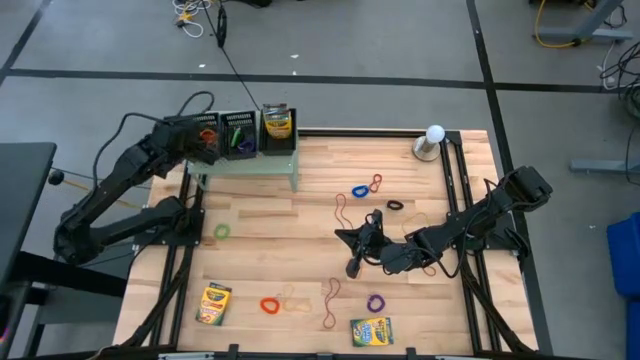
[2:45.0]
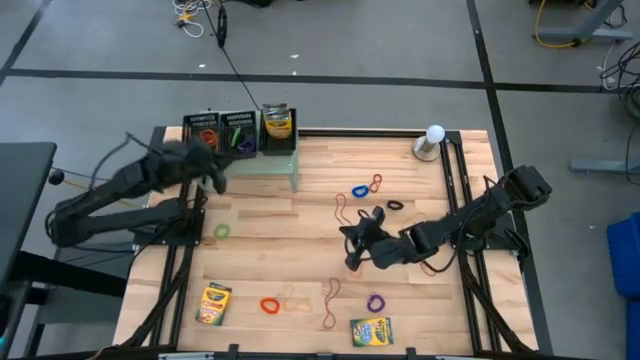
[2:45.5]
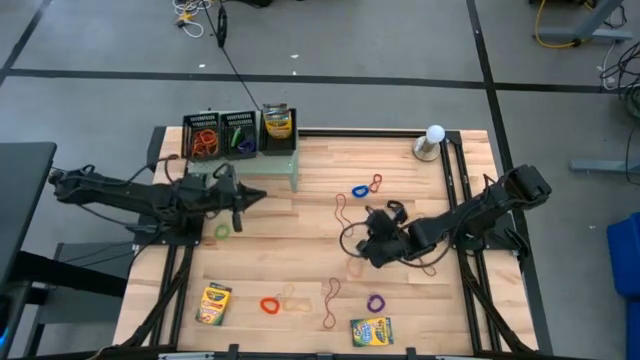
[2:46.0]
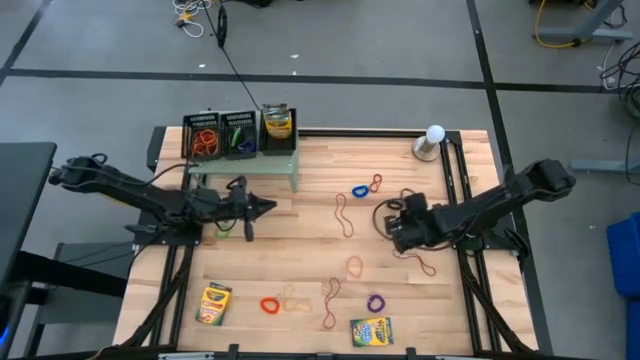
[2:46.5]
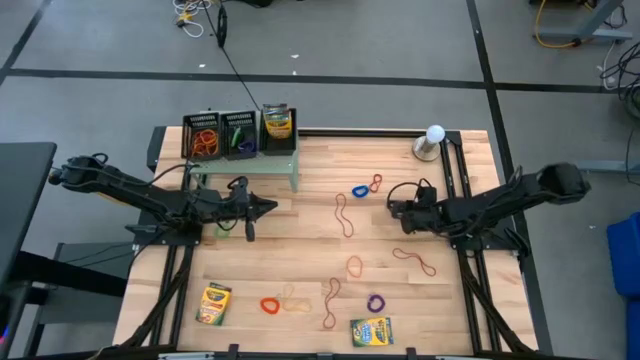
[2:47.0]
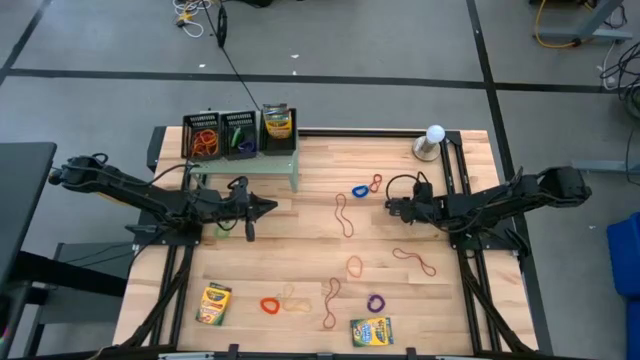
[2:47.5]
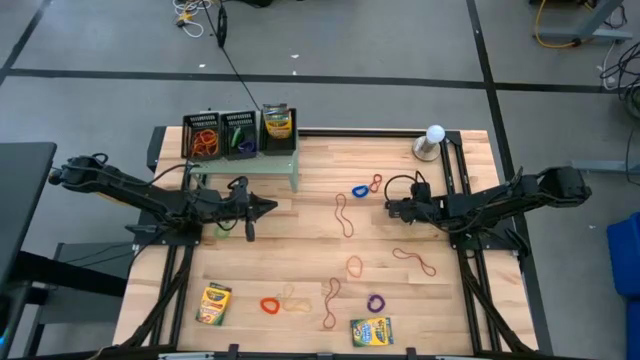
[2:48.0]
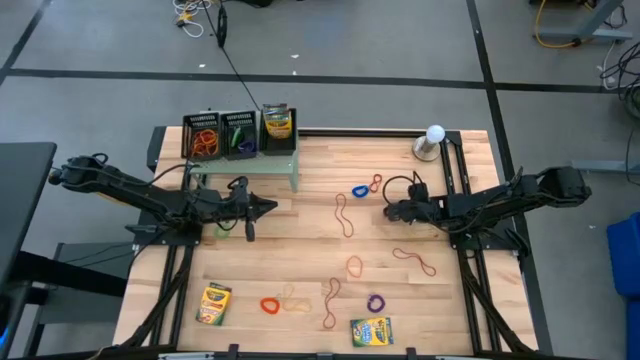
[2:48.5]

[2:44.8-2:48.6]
Task: Pick & Place Office Desk Supplies
Put the black spring keychain into the middle black bin on the shelf

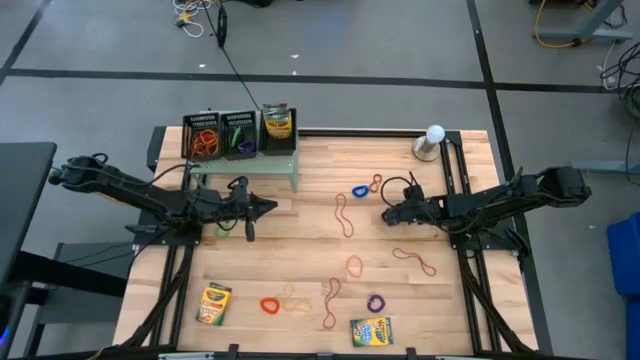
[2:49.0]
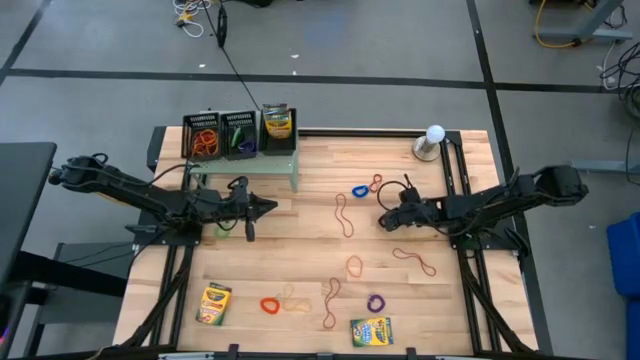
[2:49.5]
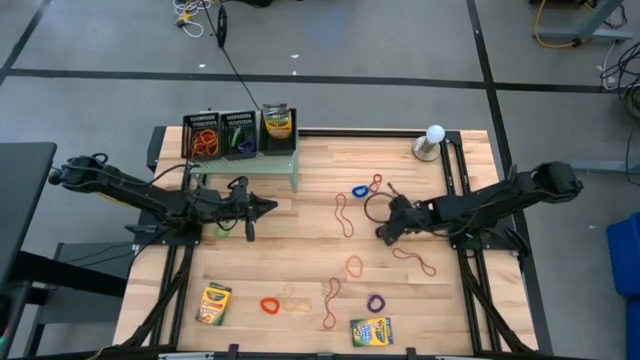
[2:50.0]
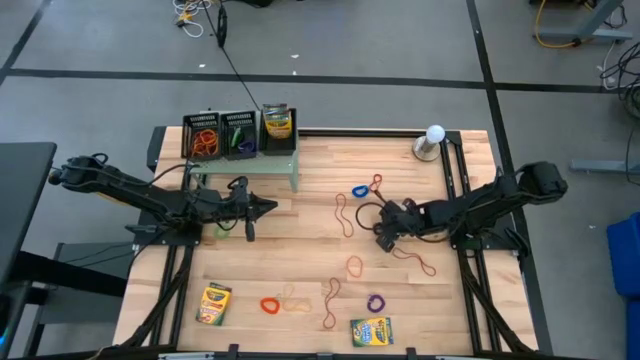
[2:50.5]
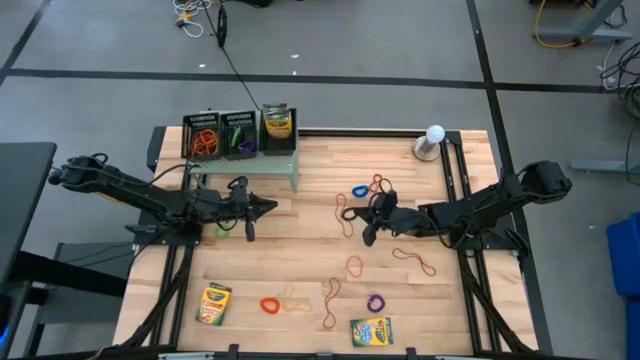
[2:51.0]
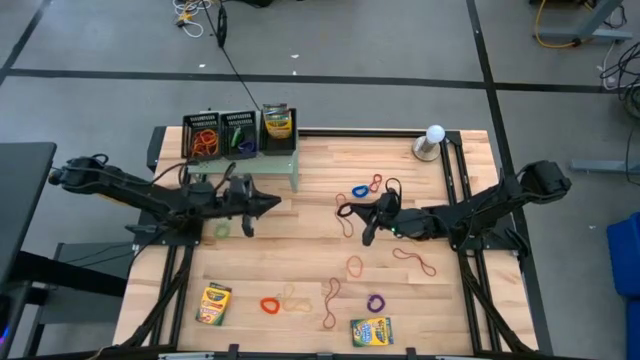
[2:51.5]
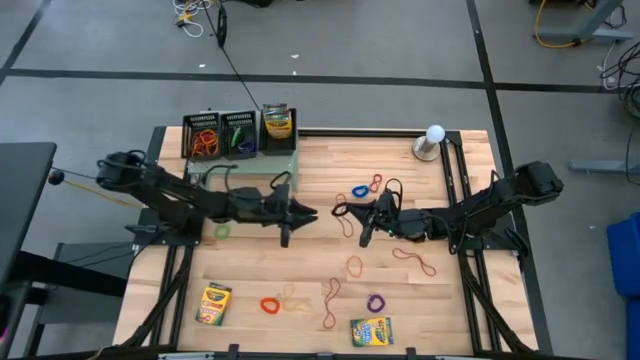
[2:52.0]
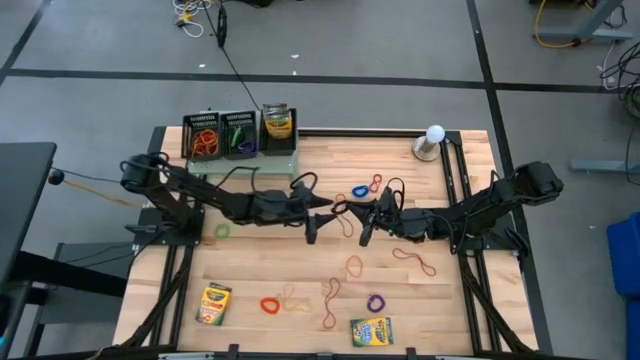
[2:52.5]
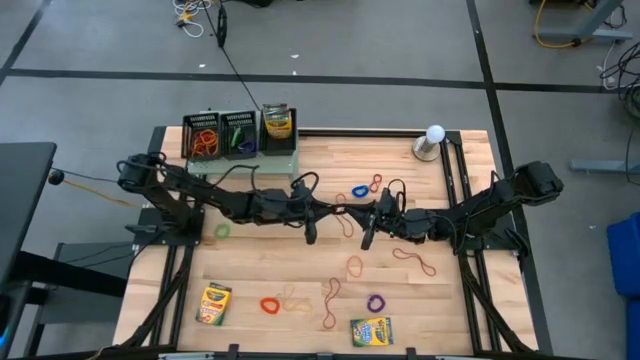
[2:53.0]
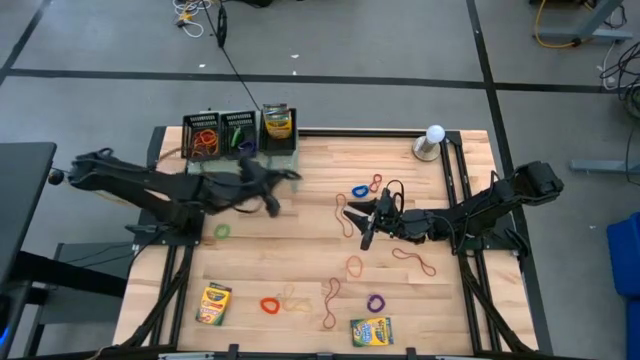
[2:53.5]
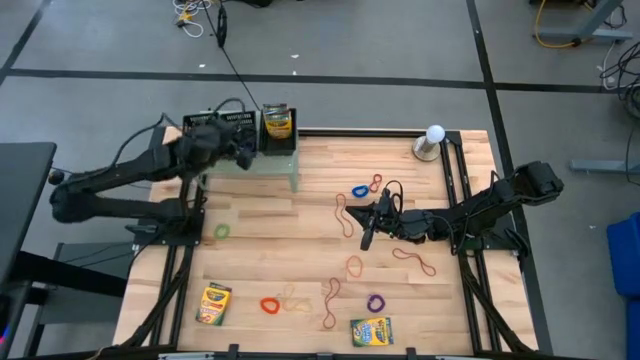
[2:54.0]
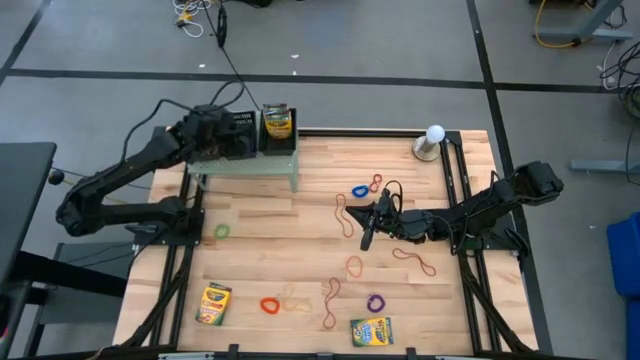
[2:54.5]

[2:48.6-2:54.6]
Put the black spring keychain into the middle black bin on the shelf

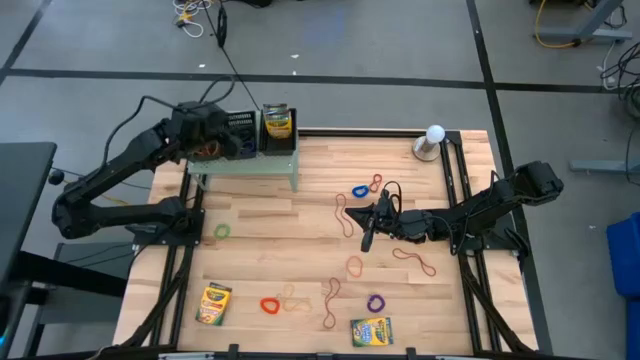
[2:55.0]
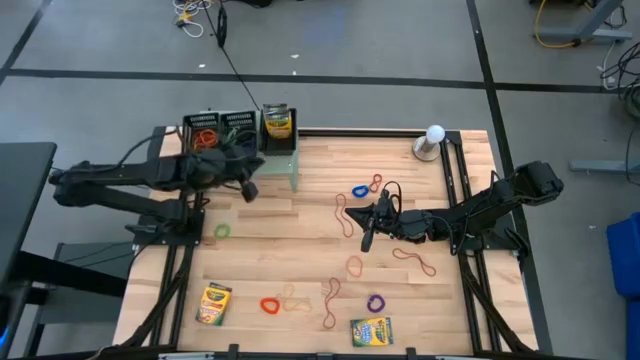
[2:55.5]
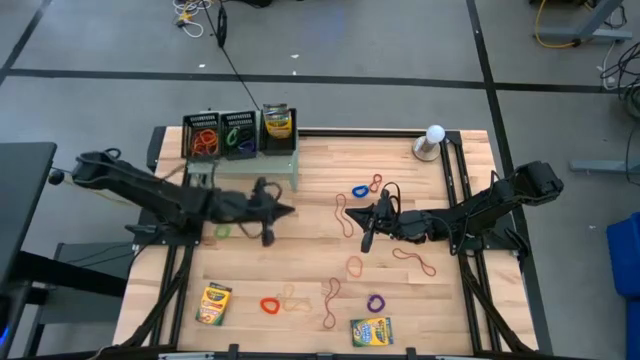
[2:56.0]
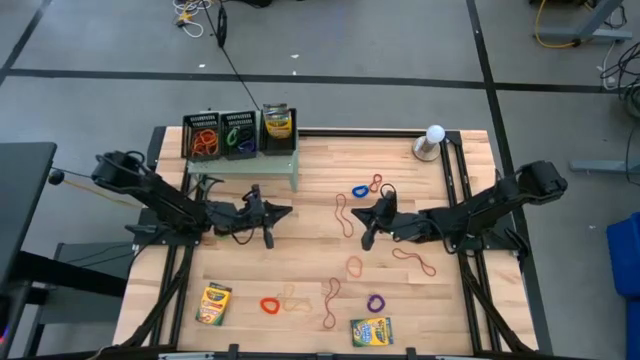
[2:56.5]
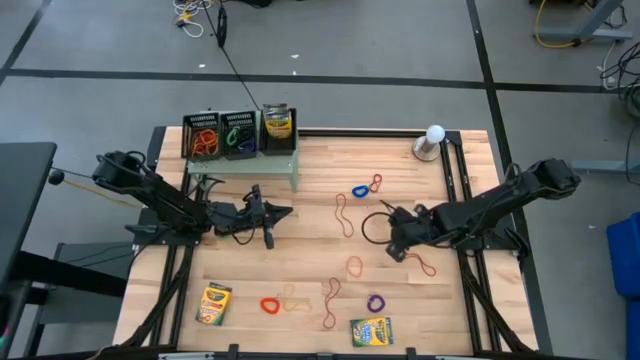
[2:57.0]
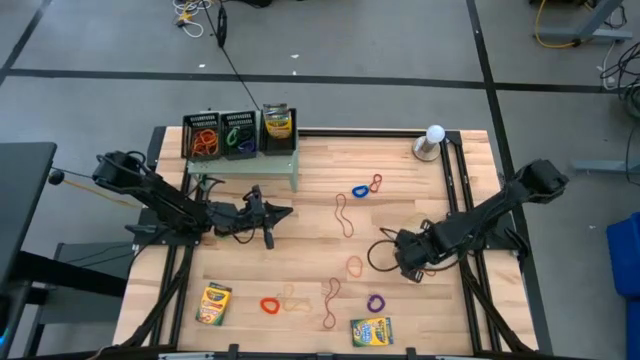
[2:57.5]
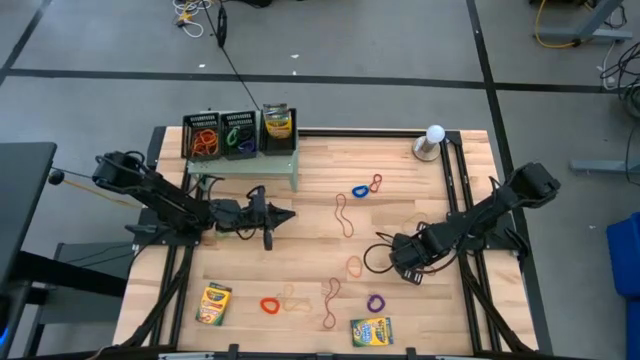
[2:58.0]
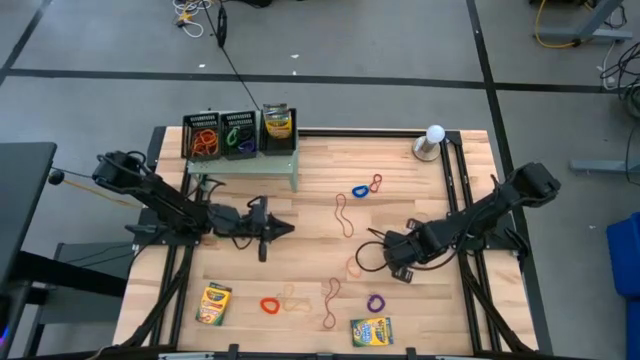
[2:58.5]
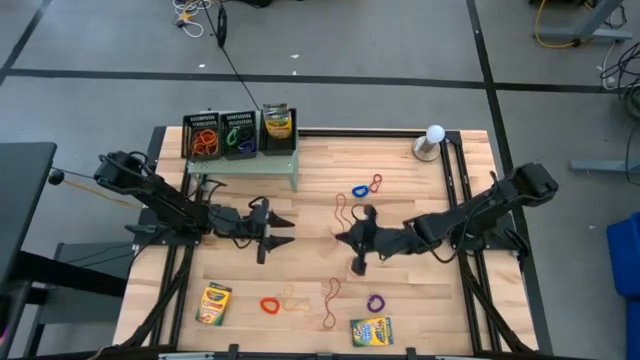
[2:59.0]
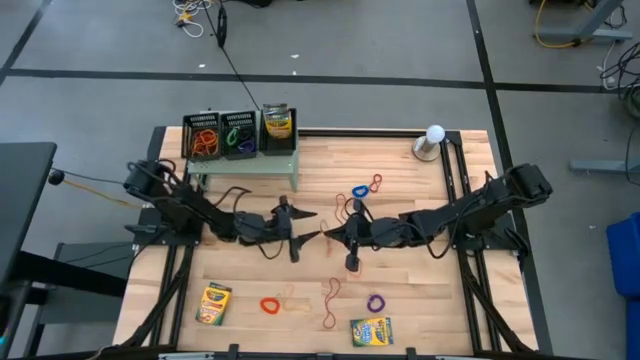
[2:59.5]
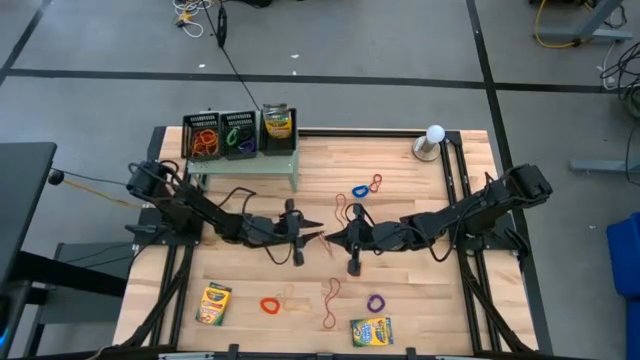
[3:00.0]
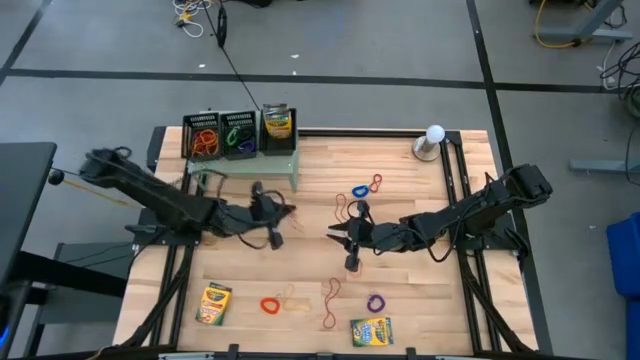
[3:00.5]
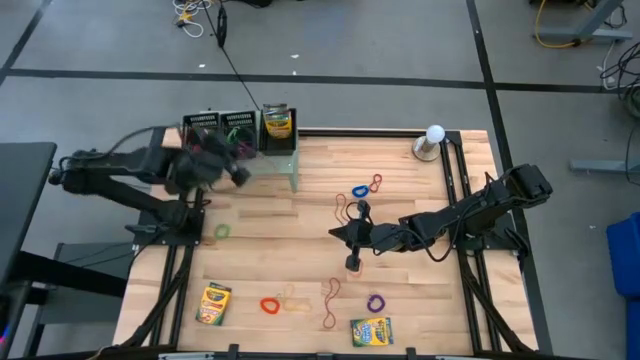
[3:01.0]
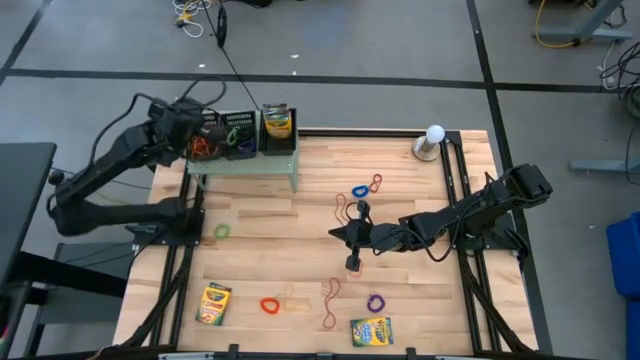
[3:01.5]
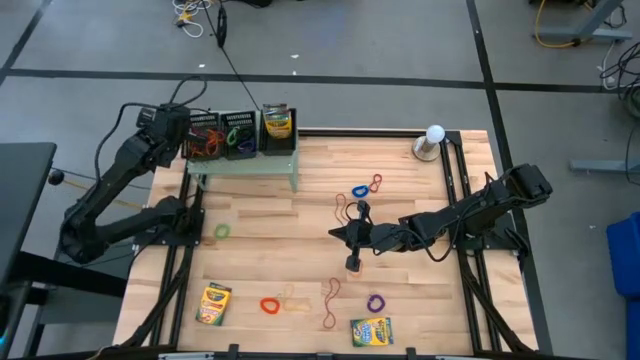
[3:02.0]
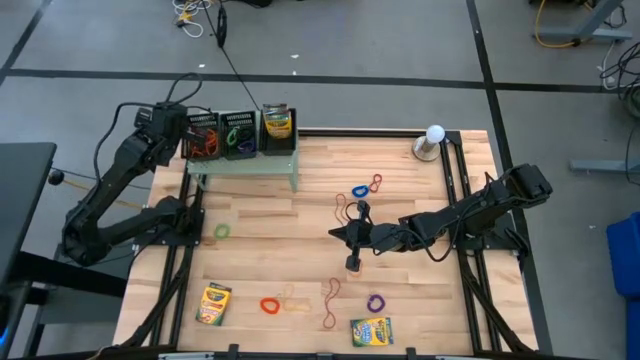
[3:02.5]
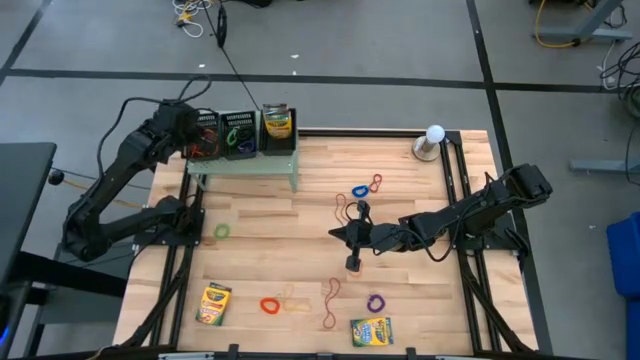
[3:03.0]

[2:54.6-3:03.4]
Put the red rubber band into the left black bin on the shelf

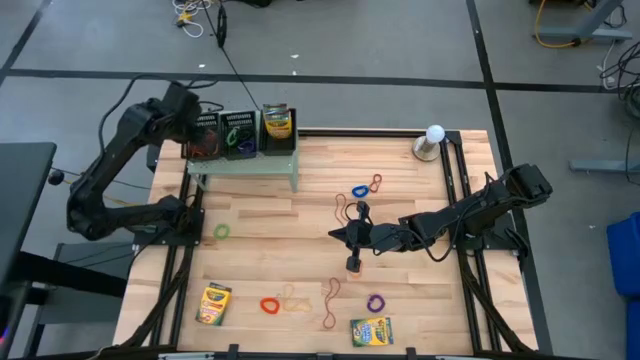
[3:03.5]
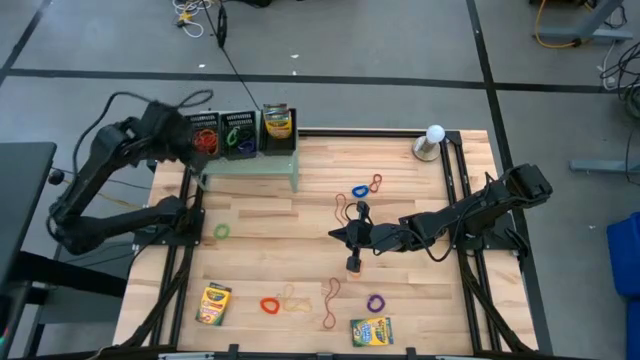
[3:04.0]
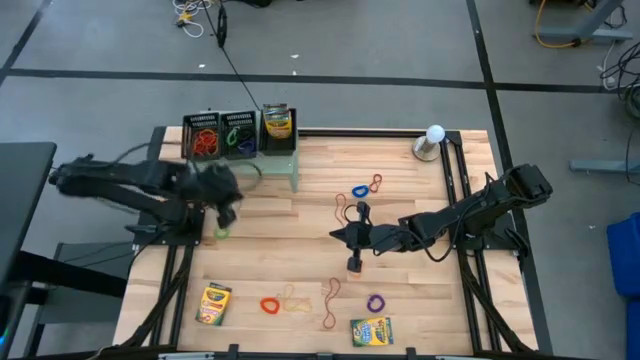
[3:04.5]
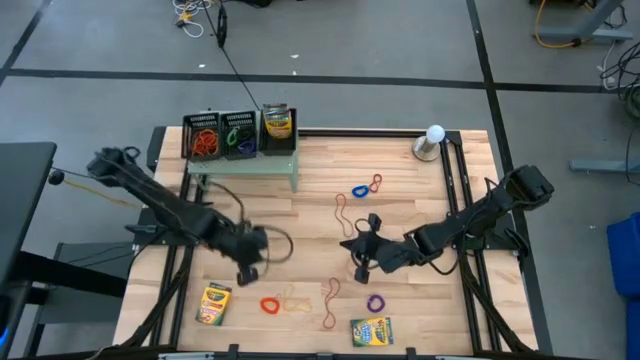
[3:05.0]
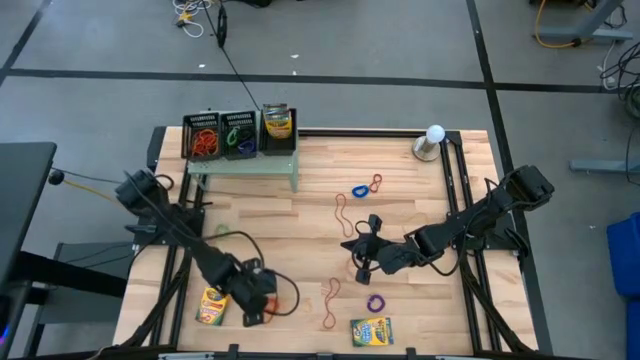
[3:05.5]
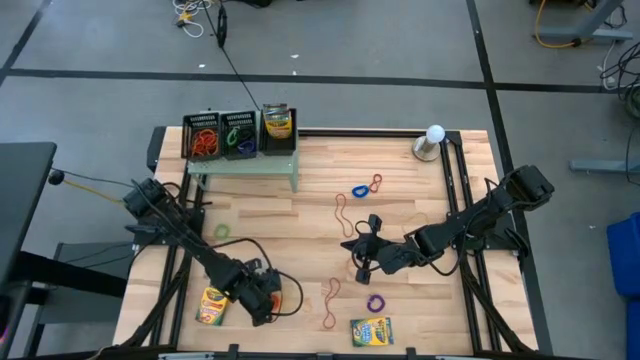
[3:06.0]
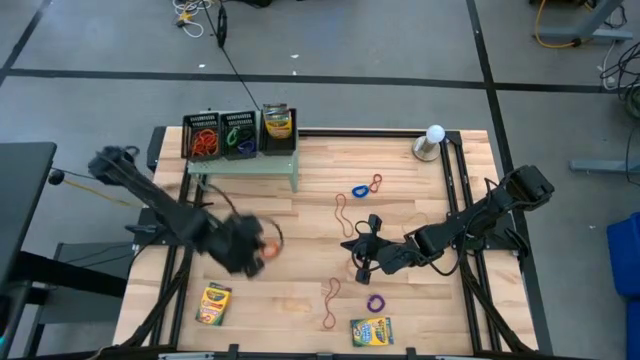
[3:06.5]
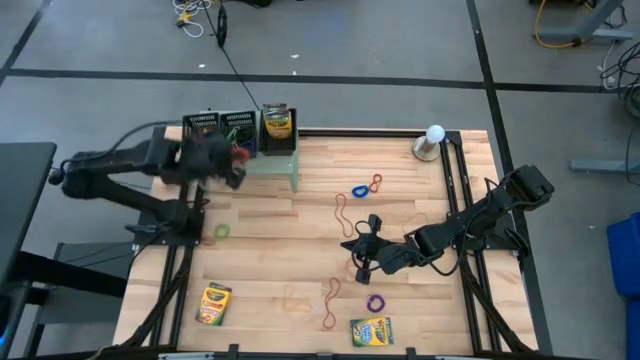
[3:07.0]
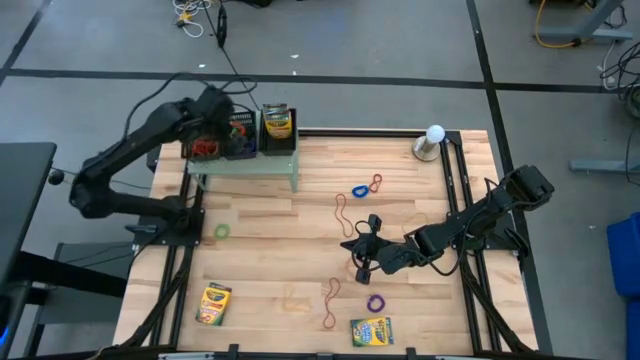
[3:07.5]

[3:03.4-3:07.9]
Put the orange spring keychain into the middle black bin on the shelf
